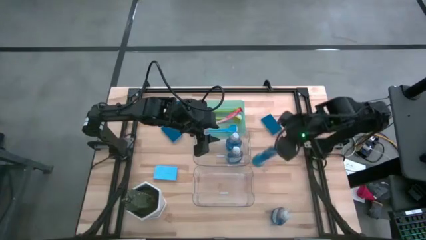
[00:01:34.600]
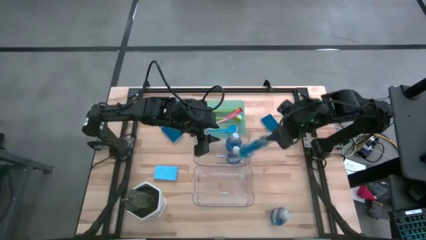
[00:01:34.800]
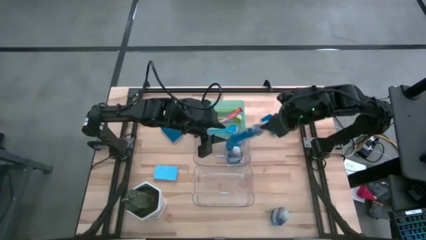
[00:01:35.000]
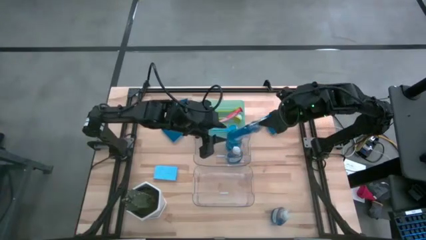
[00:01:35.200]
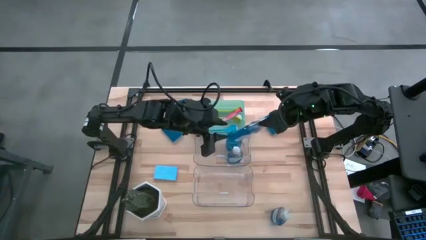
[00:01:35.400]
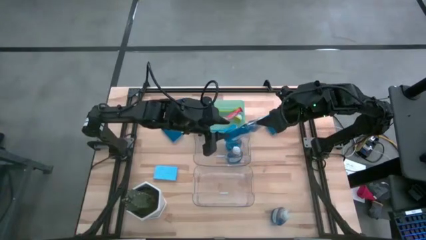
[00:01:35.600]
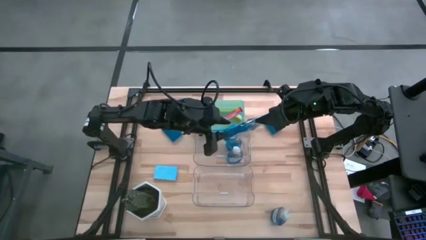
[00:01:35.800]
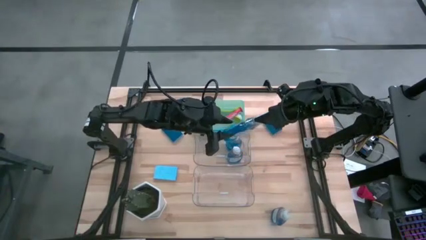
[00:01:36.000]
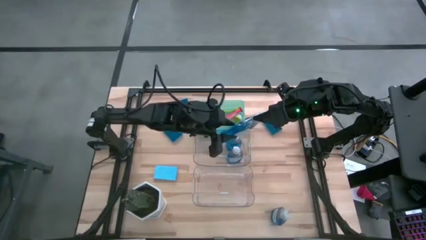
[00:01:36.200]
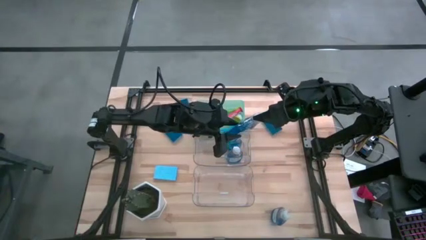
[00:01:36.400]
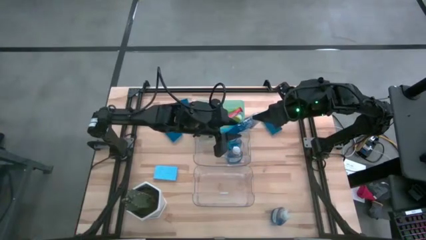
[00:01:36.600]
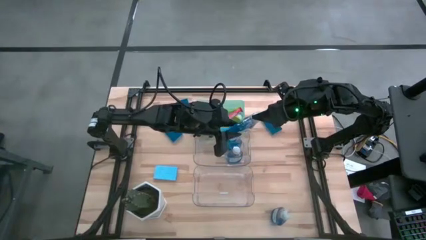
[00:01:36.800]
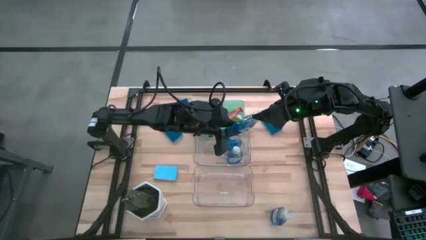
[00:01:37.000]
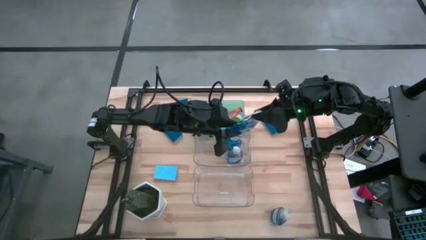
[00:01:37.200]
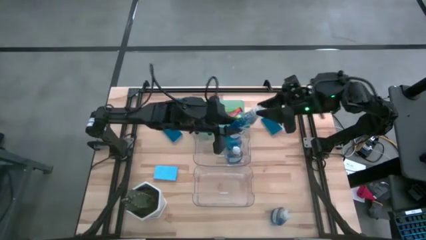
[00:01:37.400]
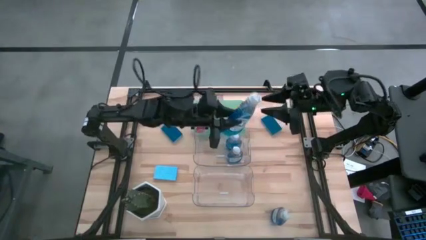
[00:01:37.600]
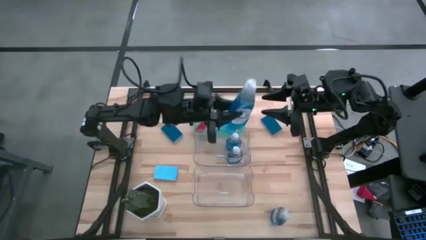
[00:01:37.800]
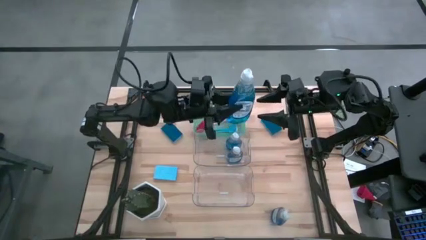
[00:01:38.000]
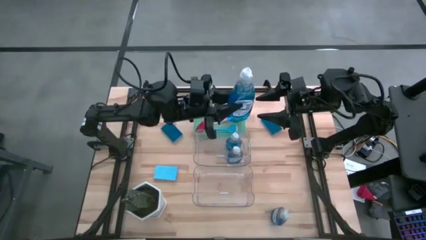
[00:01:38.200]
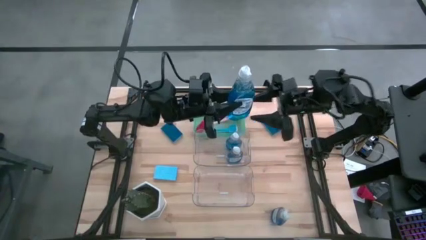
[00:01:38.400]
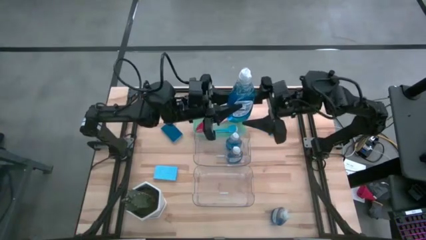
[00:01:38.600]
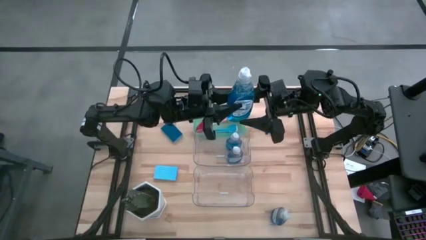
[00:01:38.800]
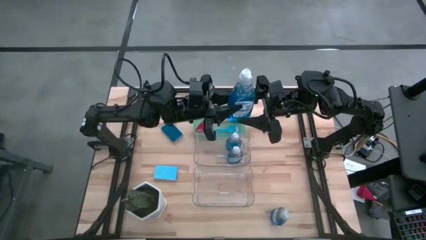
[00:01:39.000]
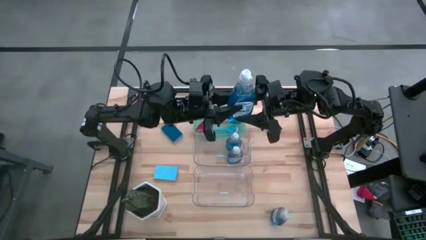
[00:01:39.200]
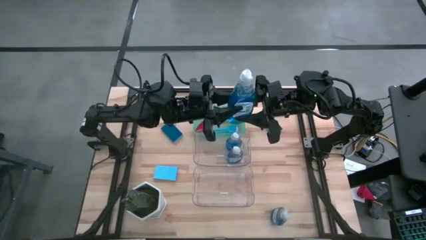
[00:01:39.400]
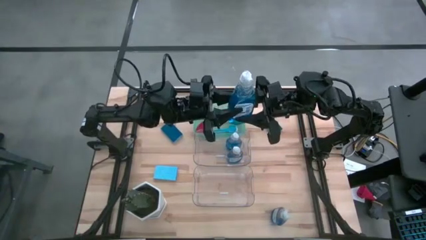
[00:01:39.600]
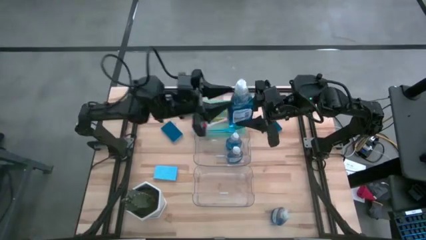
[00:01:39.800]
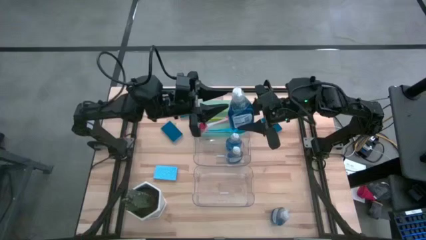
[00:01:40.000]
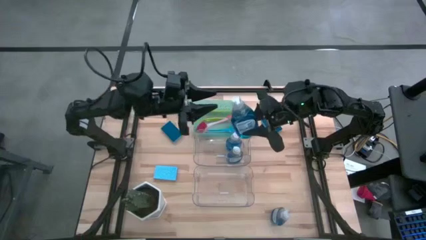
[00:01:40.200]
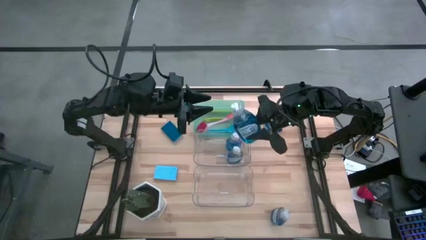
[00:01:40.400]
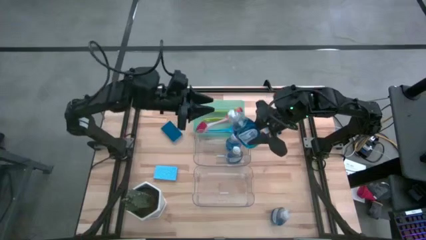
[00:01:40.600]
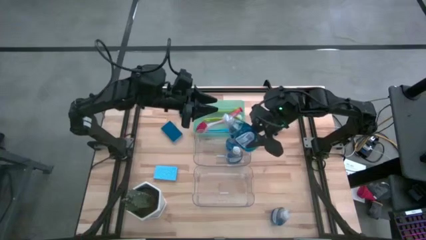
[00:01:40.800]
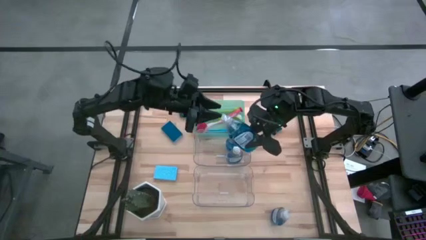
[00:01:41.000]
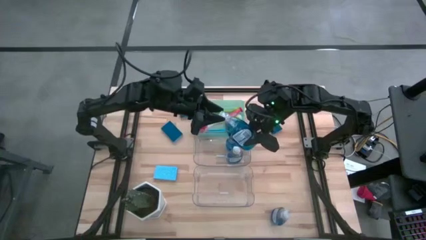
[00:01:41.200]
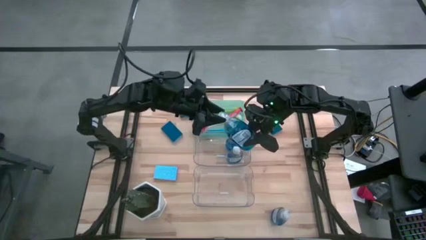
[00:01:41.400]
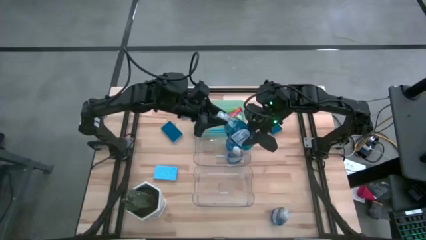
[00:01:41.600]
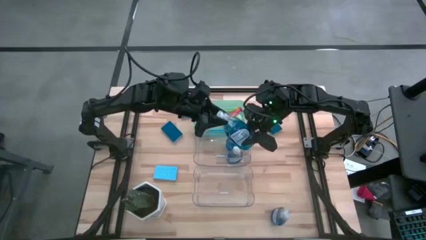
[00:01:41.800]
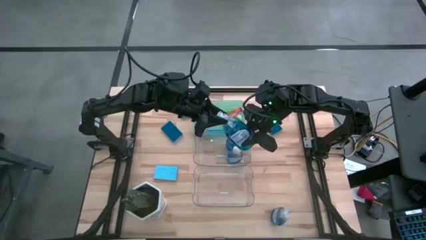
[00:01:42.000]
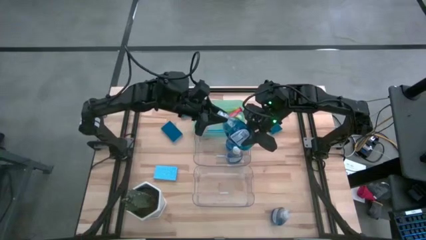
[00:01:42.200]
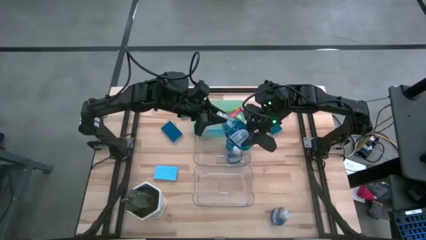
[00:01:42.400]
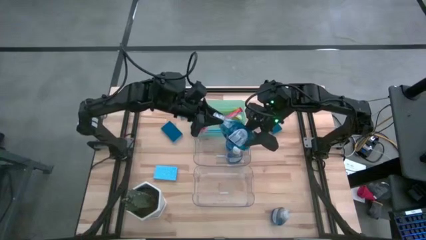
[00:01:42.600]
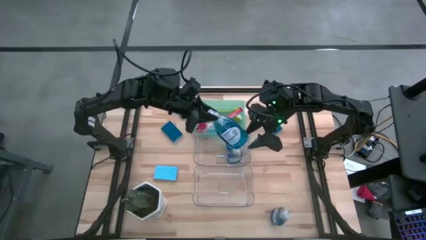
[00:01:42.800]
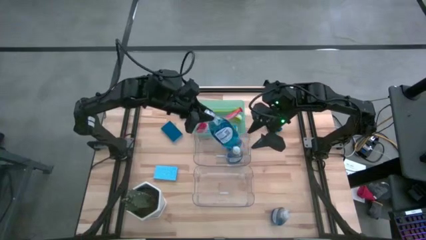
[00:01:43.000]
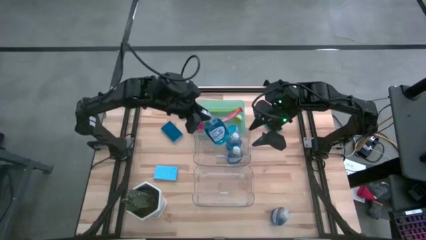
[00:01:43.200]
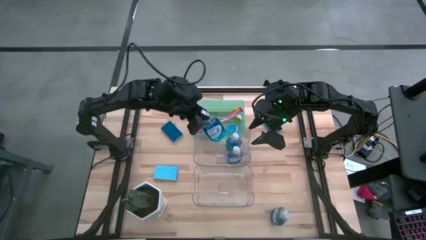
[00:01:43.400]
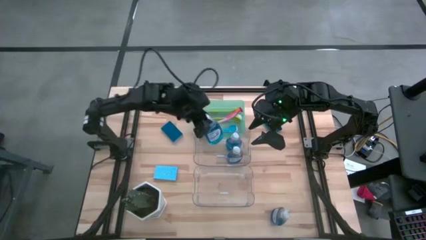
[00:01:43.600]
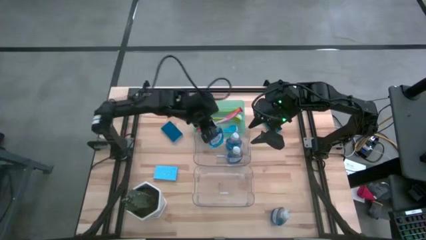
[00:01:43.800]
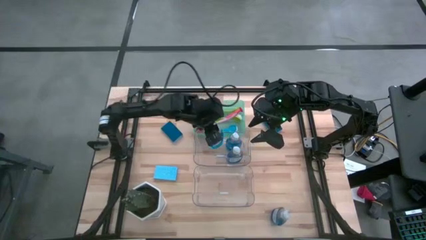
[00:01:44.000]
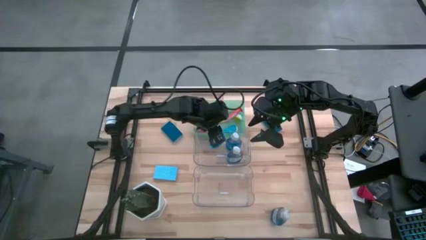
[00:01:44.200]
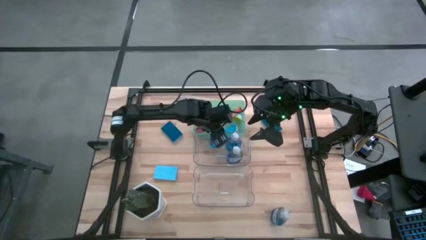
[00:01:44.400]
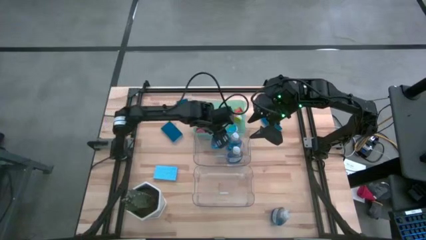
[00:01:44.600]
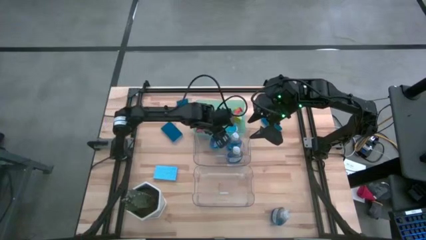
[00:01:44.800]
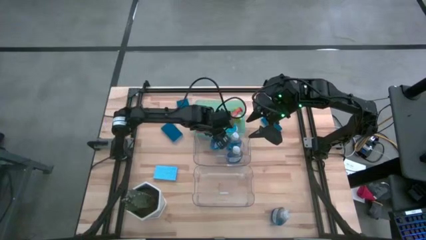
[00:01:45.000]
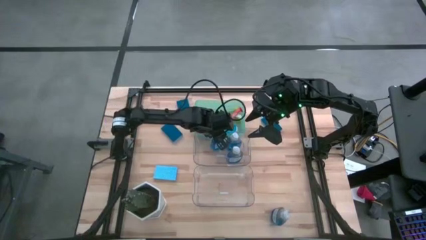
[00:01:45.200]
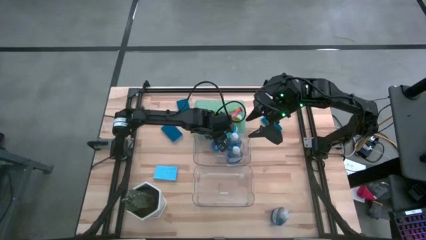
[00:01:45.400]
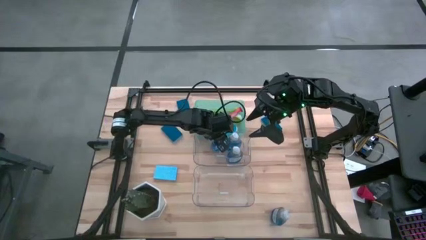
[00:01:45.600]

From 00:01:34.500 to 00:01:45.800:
Task: Pick & Place Kitchen Sink Supplies
Put the blue dishwasher liquid into the top transparent bin

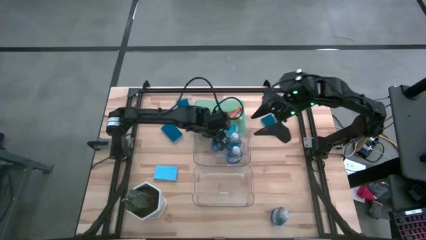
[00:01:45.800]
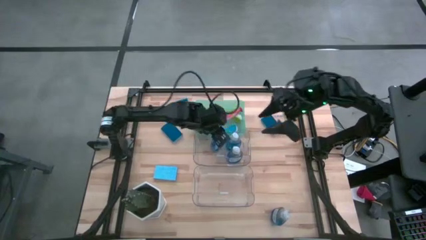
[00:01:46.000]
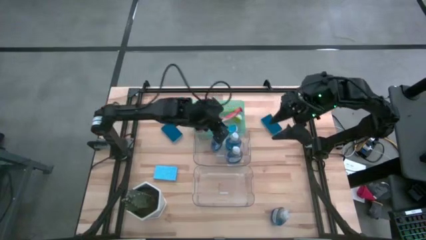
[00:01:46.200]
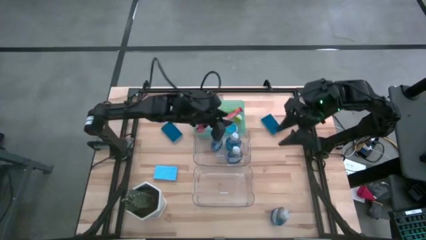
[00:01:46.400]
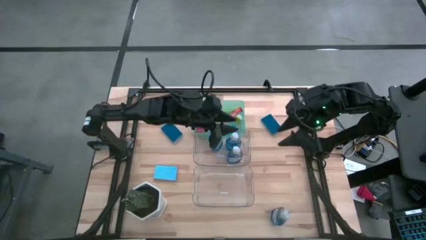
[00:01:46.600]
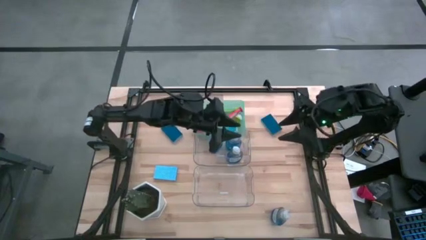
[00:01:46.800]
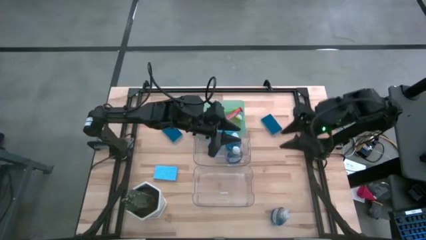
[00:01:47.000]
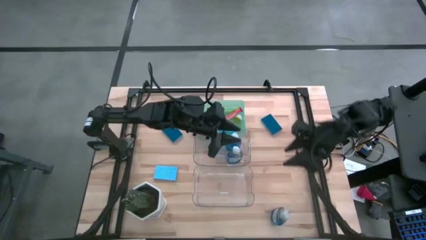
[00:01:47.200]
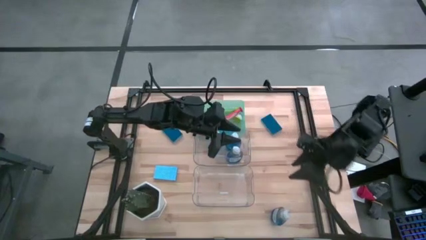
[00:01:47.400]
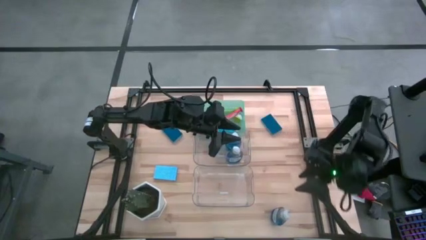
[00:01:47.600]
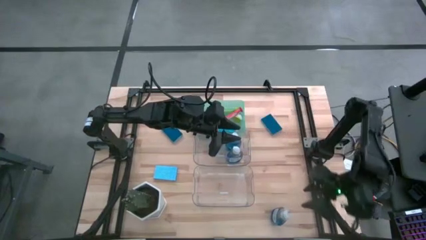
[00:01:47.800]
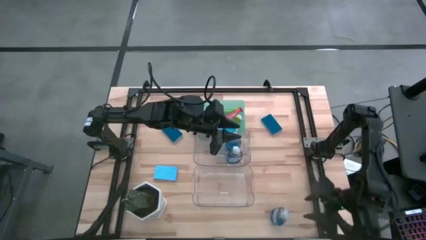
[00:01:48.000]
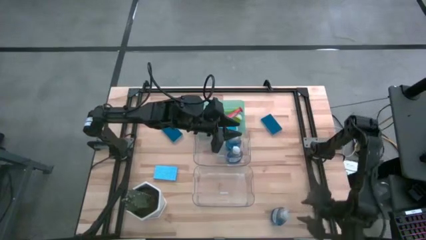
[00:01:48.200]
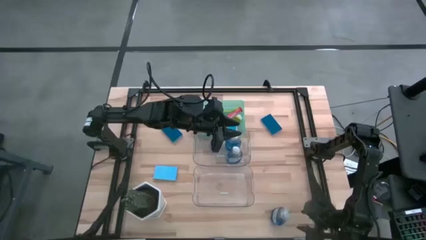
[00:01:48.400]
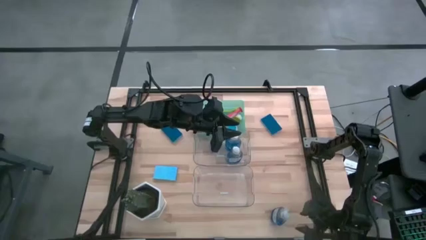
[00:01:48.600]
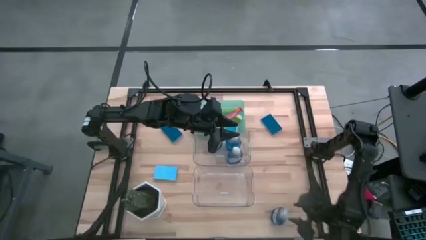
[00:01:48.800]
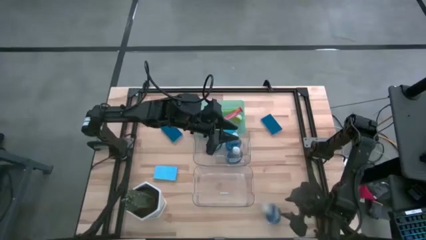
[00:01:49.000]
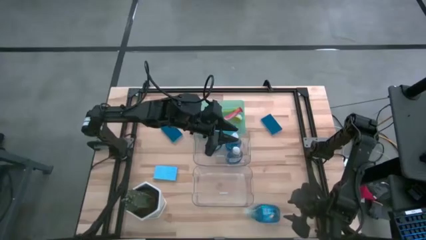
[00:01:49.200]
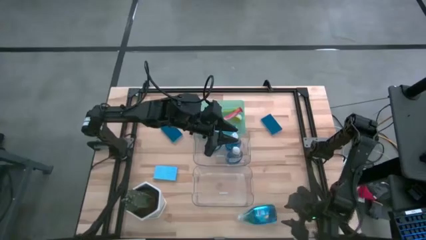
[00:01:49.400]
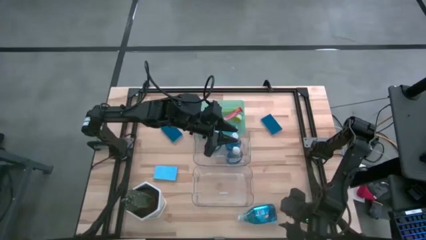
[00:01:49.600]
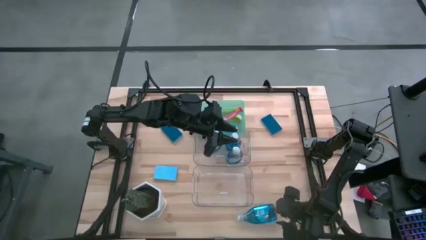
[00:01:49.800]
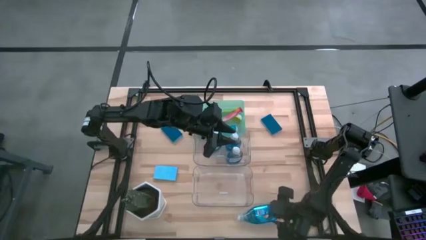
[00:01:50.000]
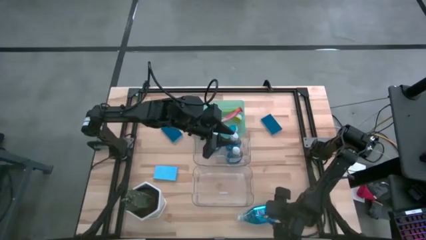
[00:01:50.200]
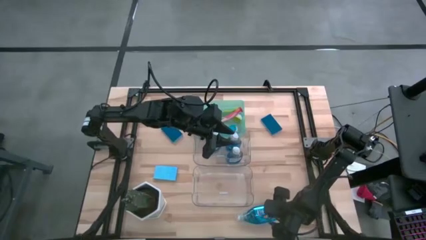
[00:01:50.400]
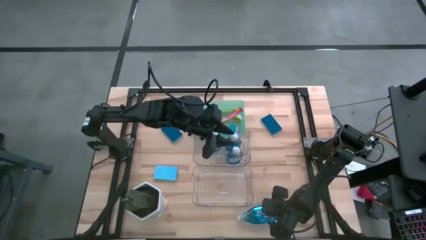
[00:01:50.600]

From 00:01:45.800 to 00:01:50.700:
Put the blue dishwasher liquid into the top transparent bin
